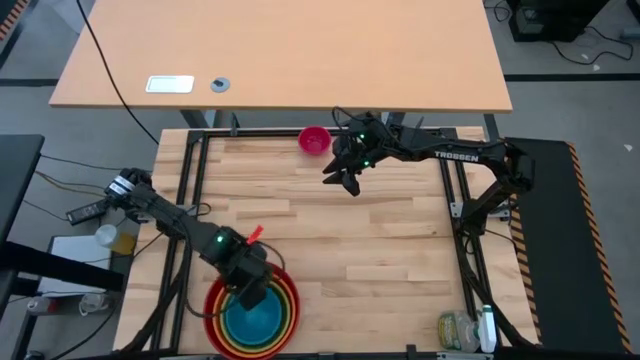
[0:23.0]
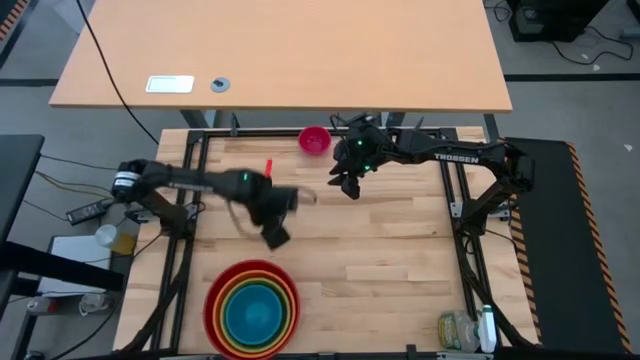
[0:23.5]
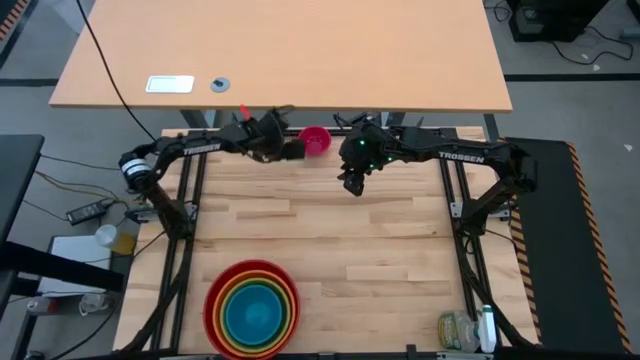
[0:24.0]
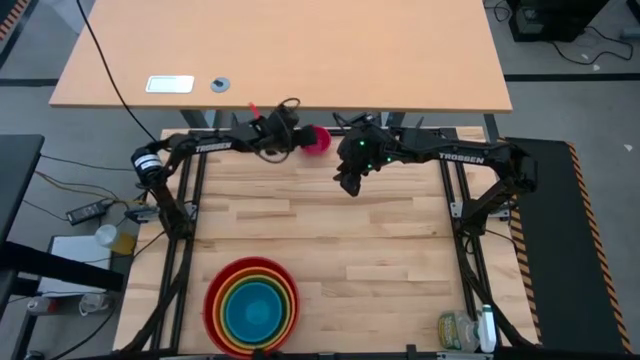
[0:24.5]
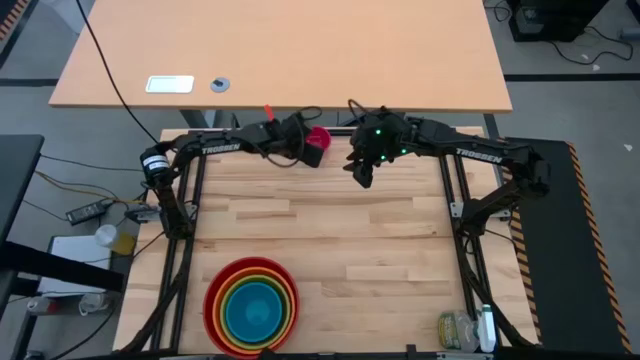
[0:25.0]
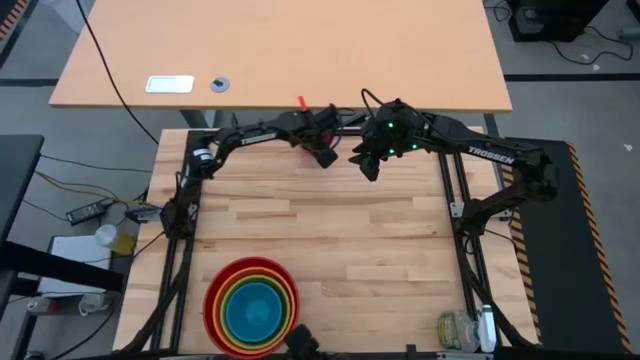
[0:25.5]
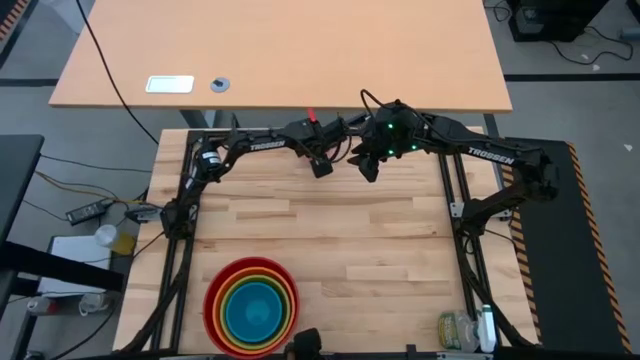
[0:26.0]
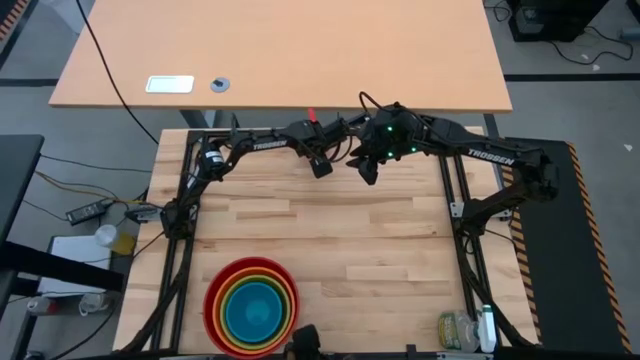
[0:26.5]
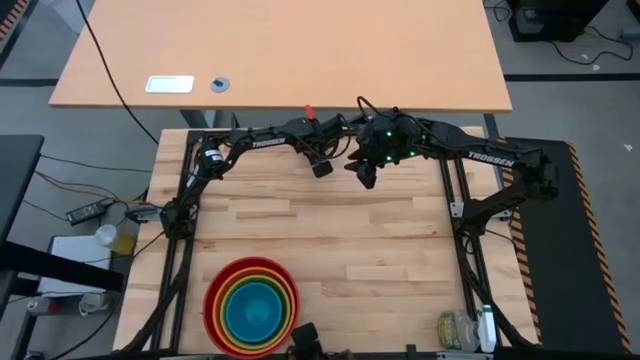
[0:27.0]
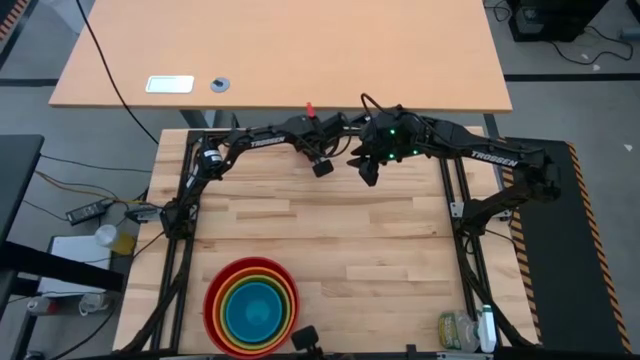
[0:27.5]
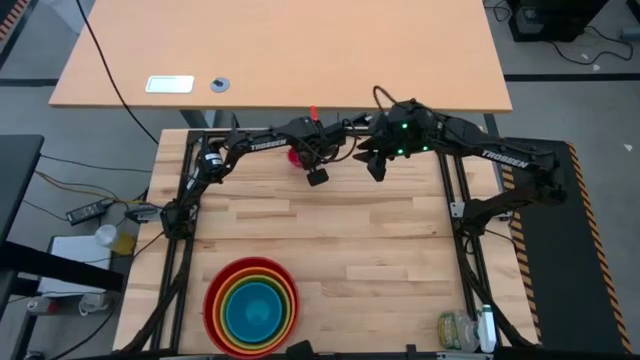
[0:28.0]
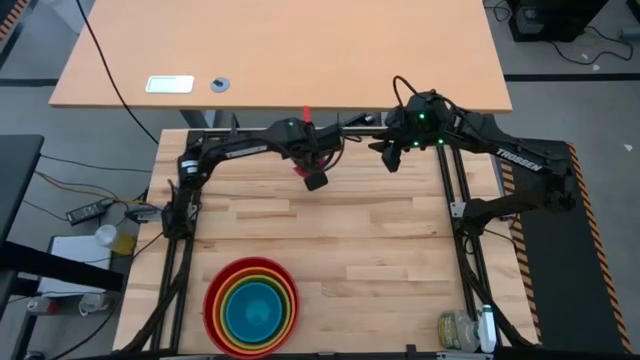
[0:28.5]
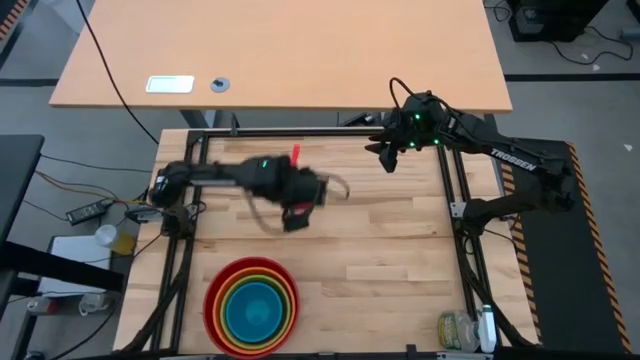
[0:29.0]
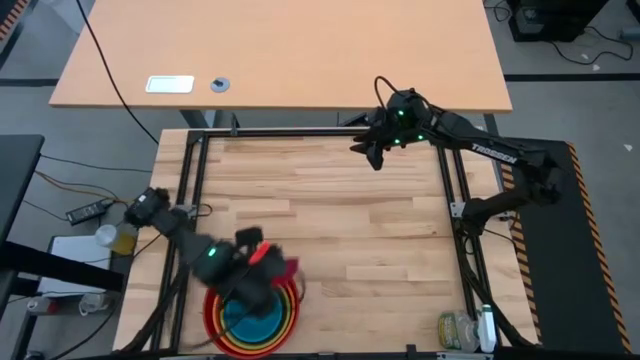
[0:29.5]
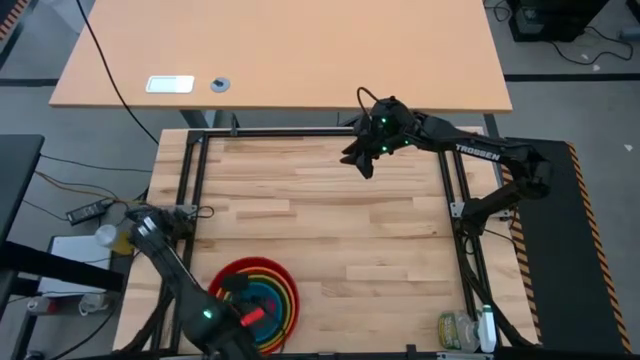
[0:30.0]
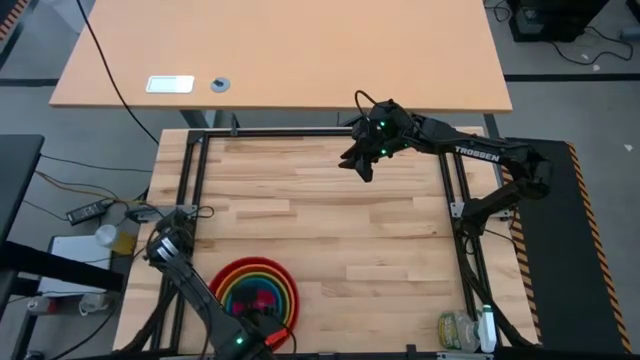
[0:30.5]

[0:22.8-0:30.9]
Stack the pink bowl on top of the blue bowl

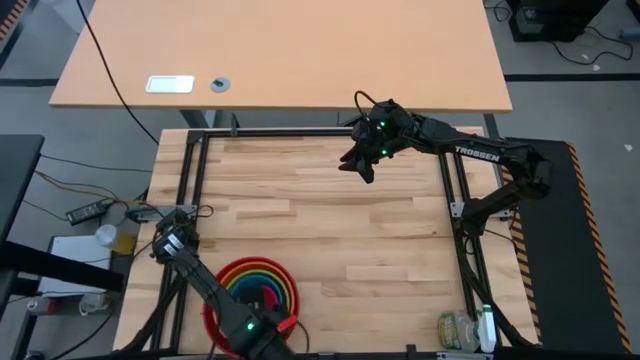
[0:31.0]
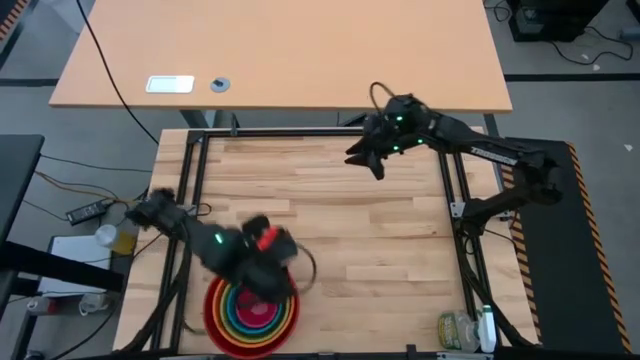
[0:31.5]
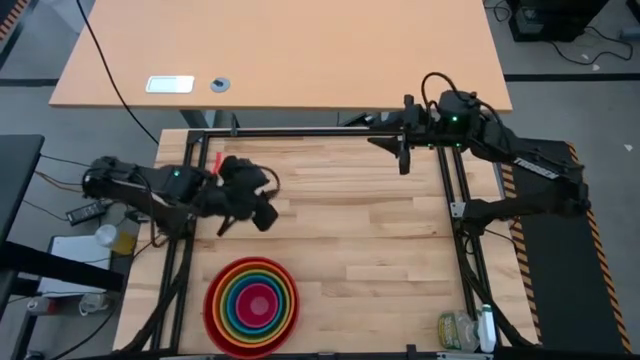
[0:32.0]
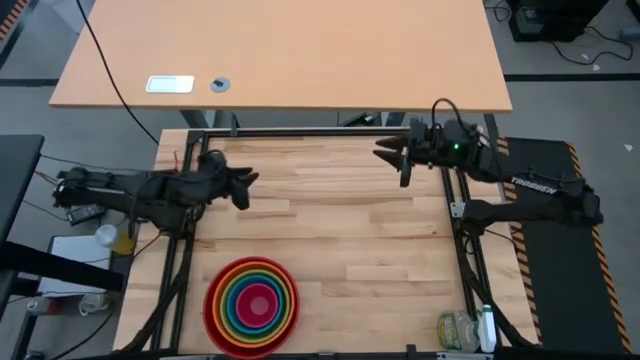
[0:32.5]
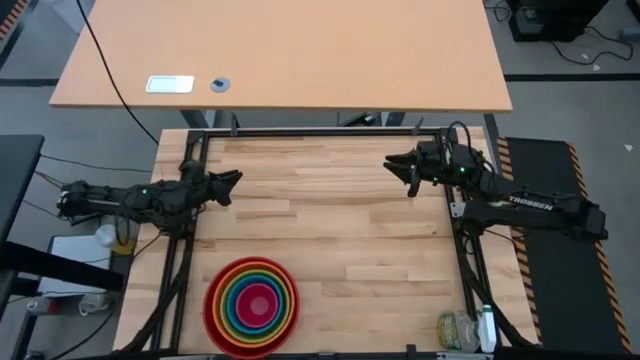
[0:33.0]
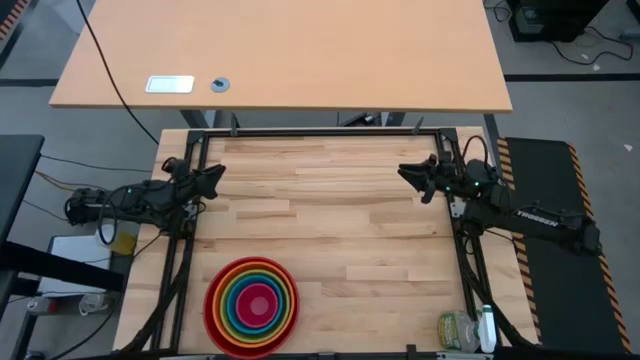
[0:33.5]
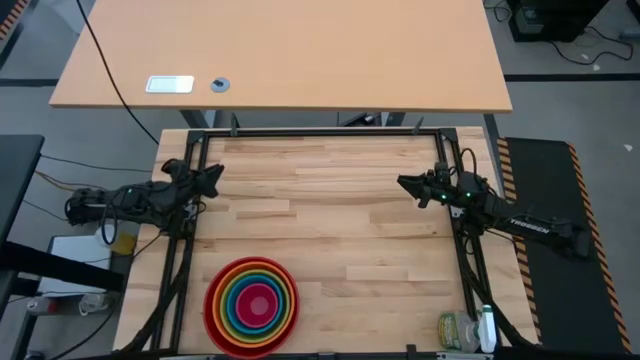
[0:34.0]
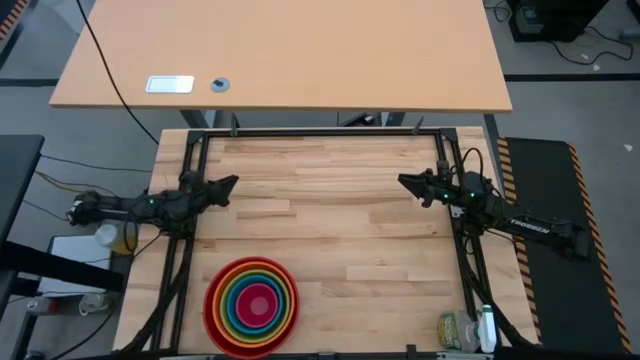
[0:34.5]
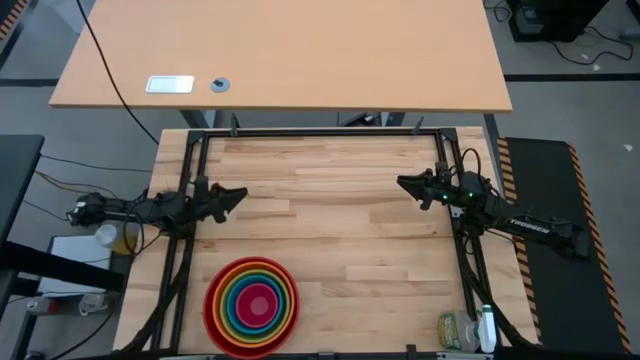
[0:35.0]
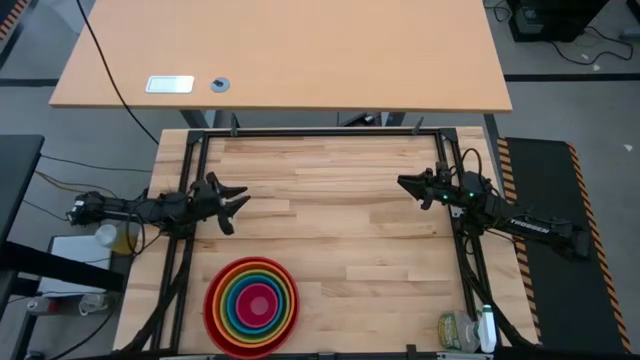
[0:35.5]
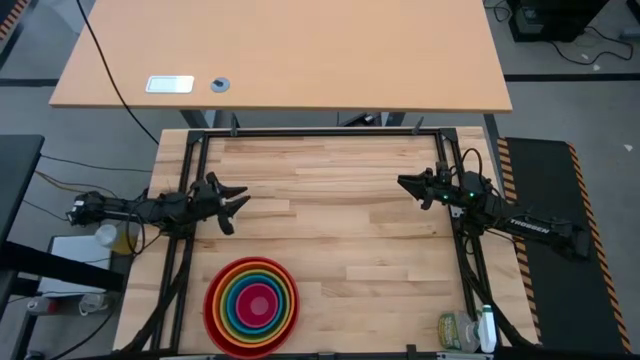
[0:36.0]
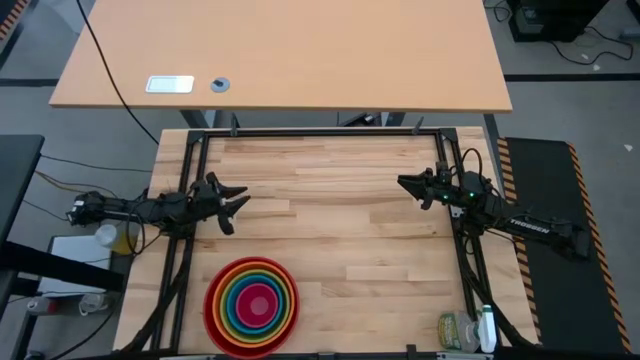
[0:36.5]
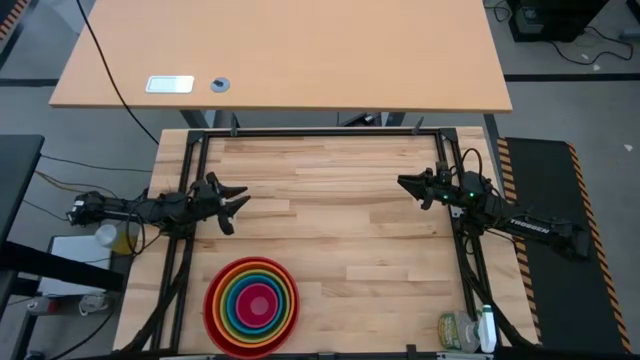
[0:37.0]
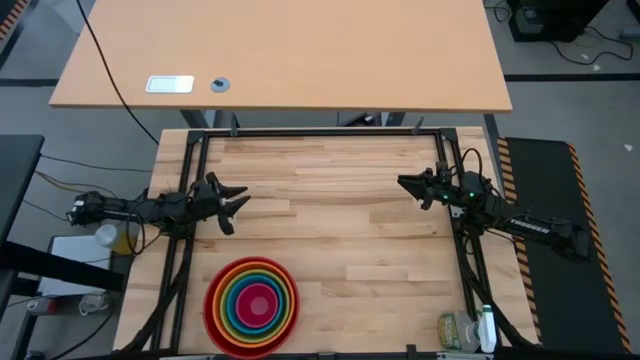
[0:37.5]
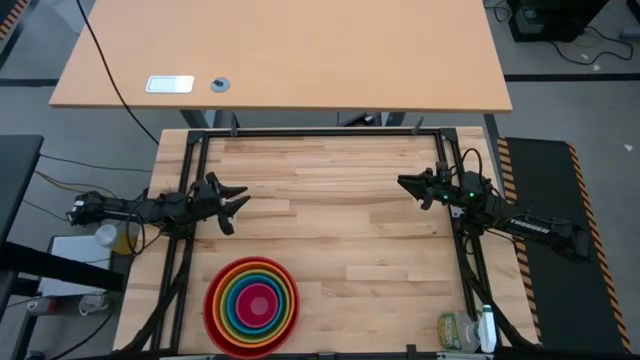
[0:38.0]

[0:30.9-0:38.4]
Return to Home Position
